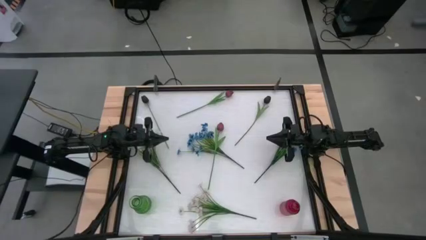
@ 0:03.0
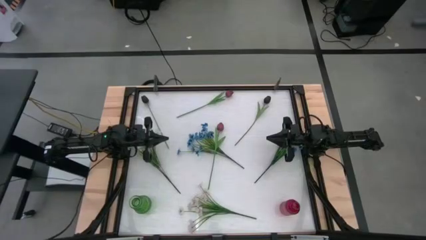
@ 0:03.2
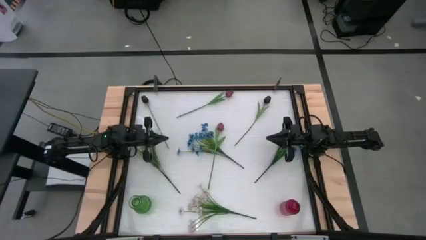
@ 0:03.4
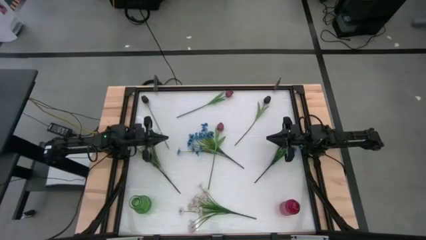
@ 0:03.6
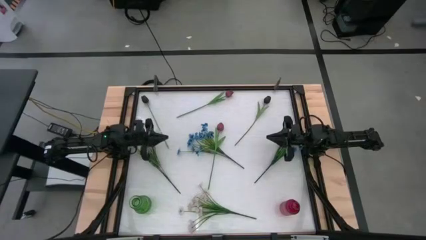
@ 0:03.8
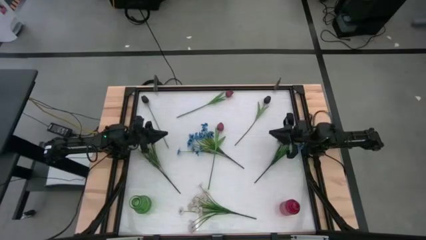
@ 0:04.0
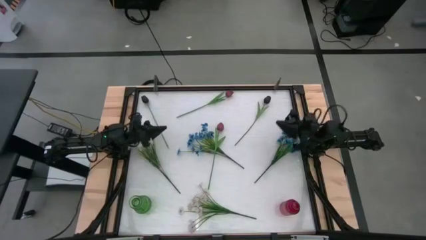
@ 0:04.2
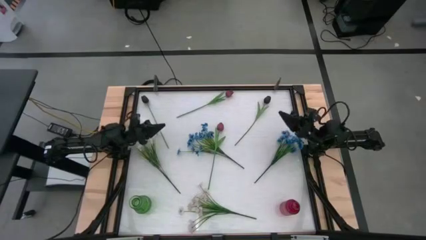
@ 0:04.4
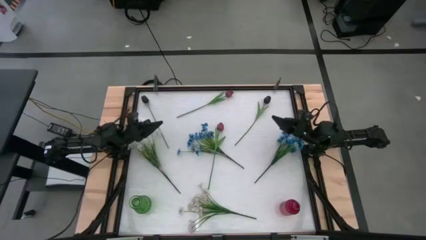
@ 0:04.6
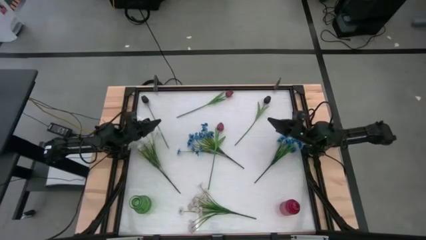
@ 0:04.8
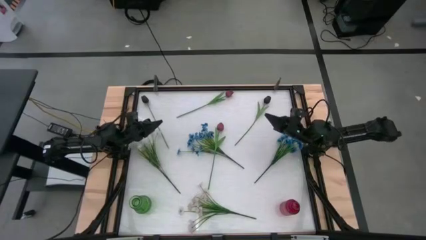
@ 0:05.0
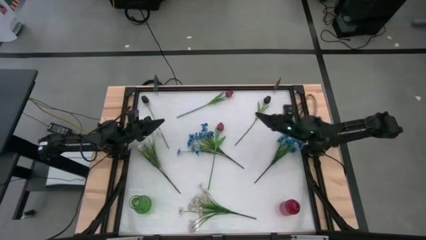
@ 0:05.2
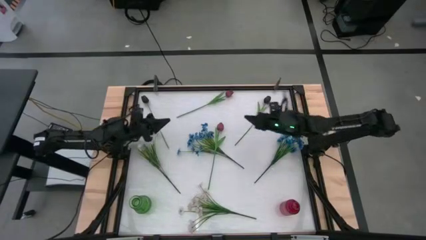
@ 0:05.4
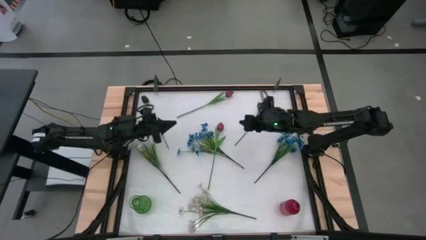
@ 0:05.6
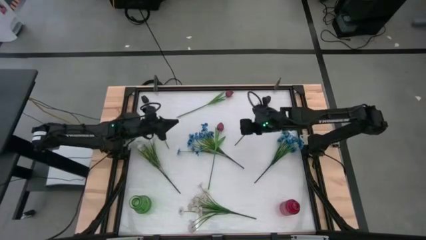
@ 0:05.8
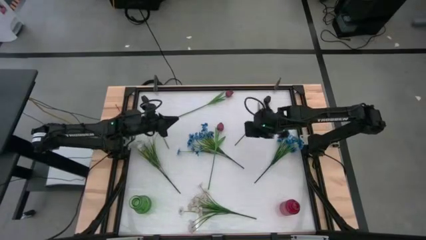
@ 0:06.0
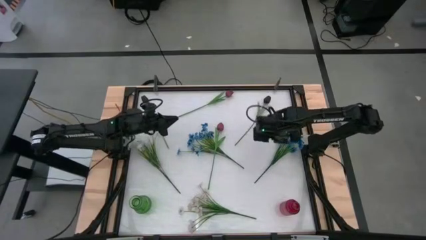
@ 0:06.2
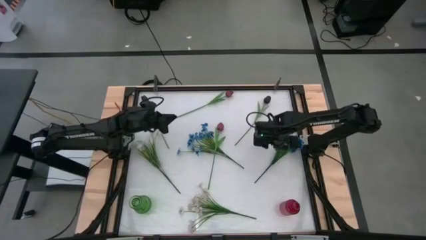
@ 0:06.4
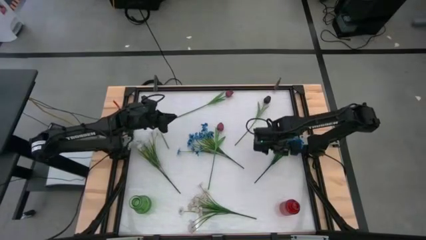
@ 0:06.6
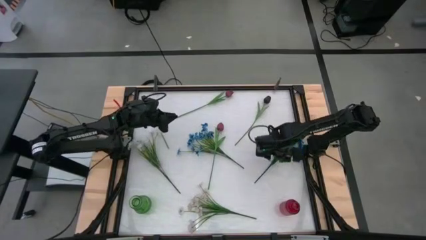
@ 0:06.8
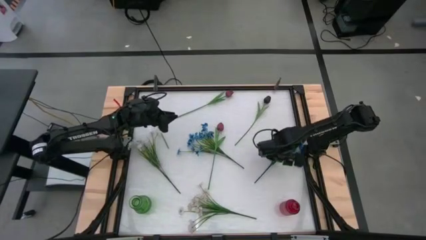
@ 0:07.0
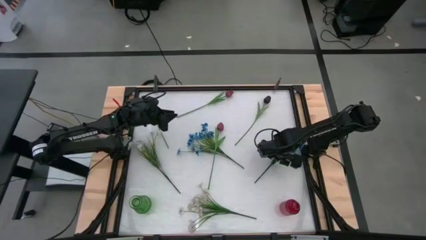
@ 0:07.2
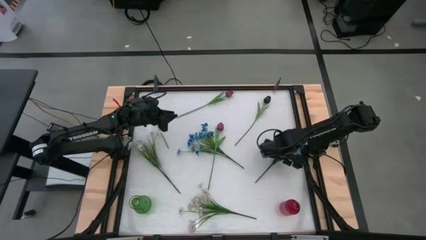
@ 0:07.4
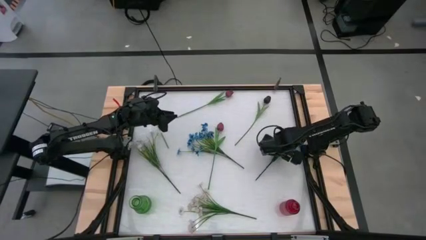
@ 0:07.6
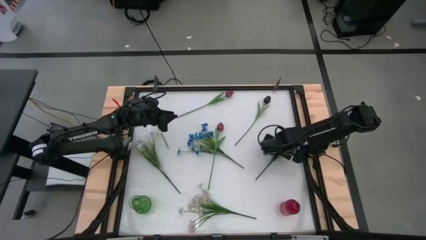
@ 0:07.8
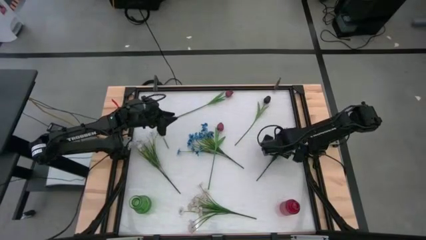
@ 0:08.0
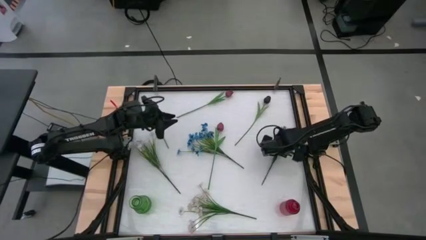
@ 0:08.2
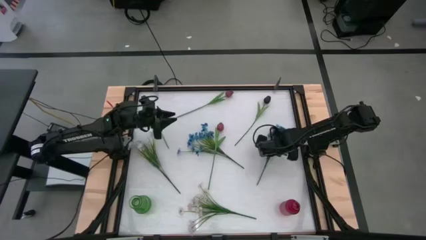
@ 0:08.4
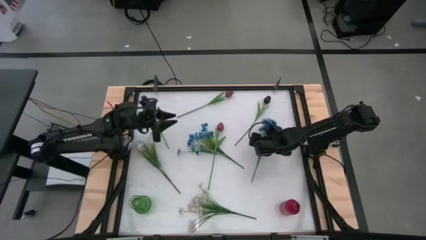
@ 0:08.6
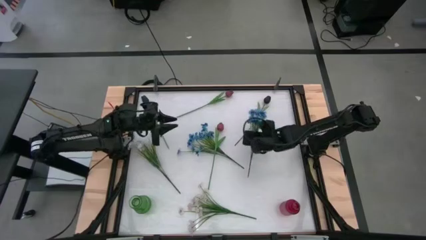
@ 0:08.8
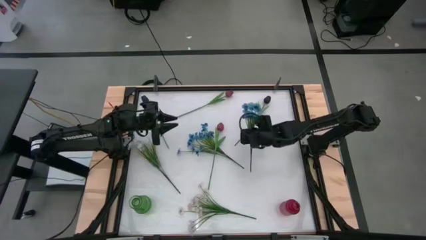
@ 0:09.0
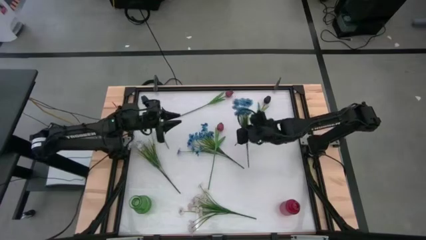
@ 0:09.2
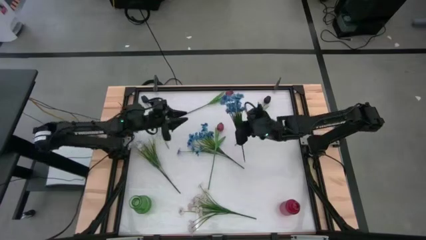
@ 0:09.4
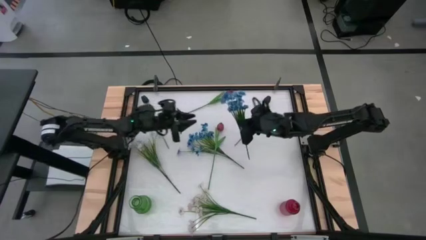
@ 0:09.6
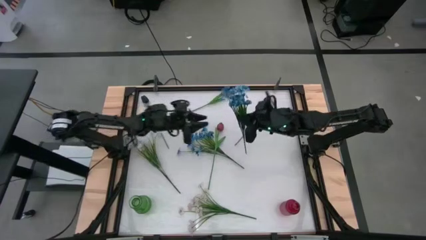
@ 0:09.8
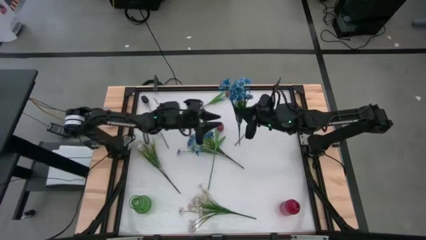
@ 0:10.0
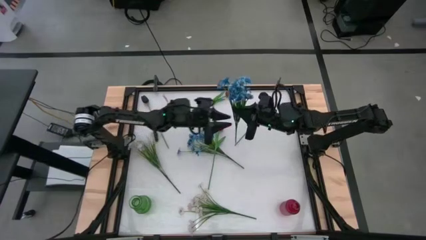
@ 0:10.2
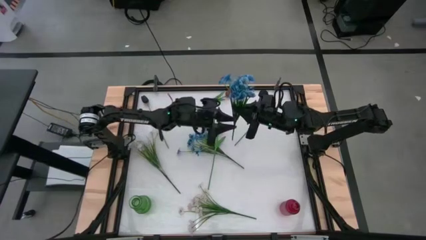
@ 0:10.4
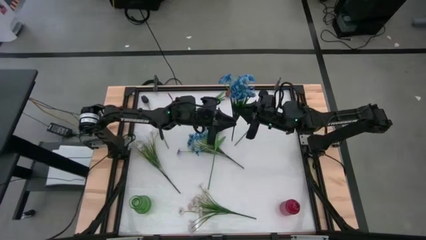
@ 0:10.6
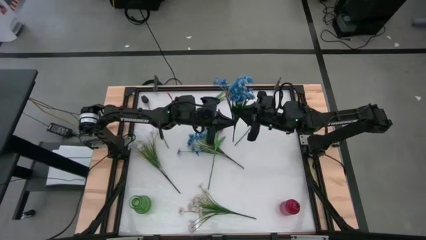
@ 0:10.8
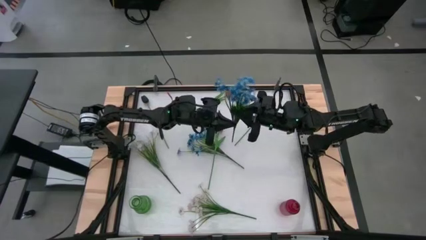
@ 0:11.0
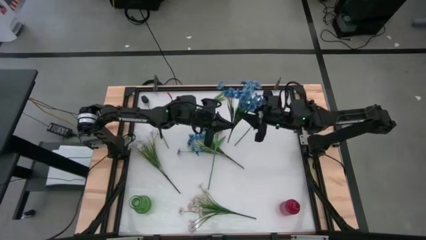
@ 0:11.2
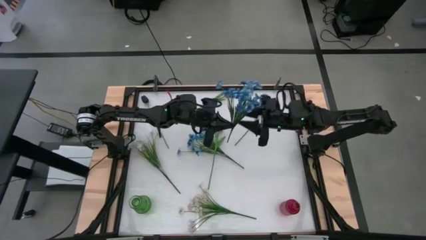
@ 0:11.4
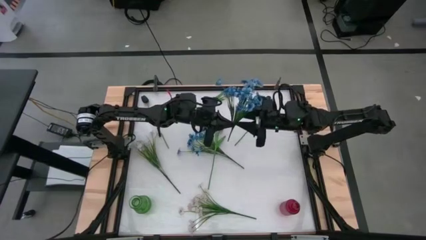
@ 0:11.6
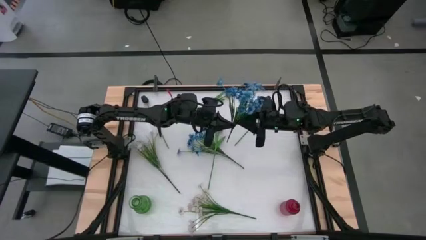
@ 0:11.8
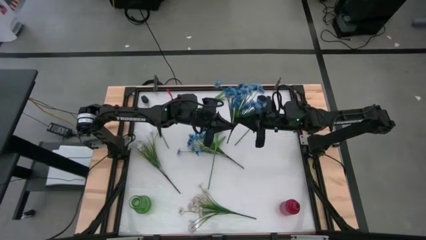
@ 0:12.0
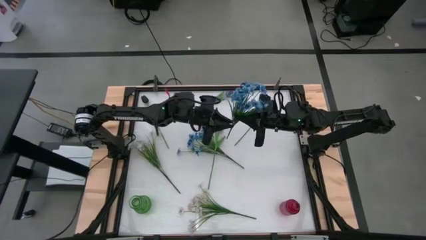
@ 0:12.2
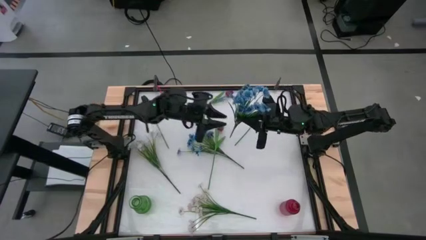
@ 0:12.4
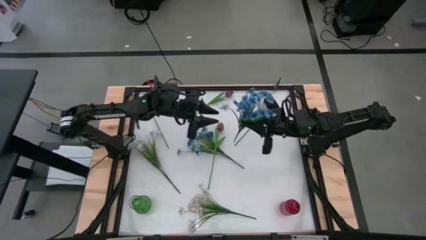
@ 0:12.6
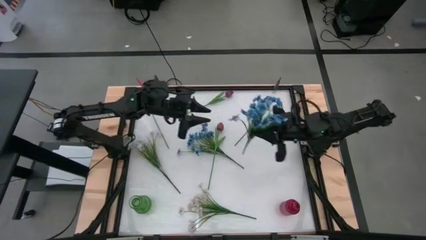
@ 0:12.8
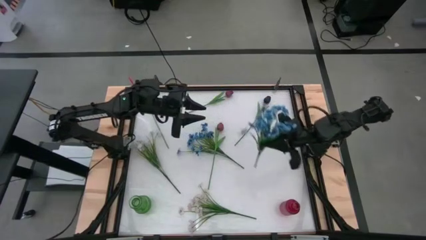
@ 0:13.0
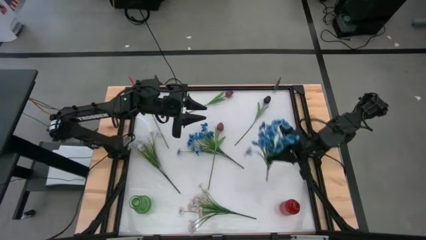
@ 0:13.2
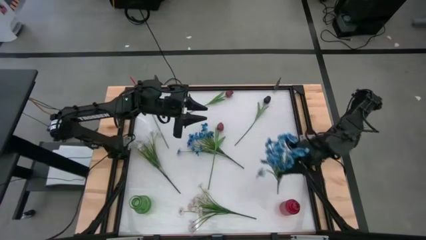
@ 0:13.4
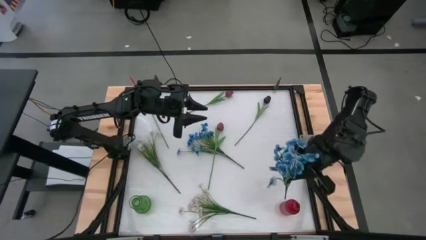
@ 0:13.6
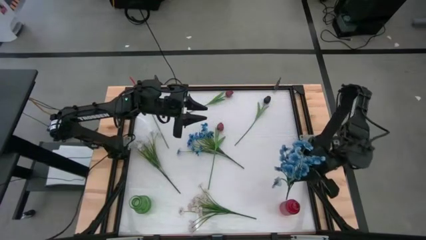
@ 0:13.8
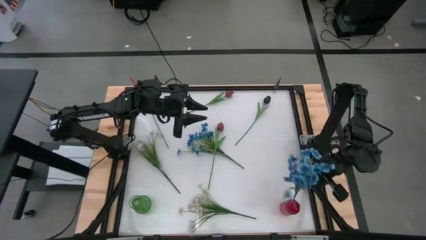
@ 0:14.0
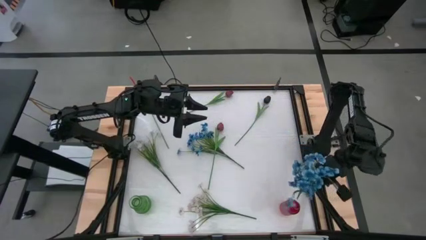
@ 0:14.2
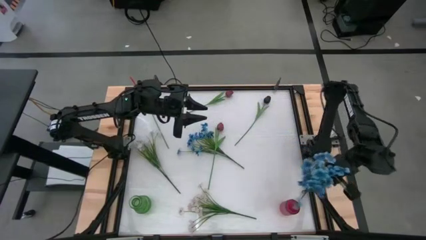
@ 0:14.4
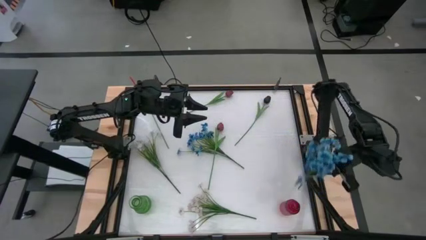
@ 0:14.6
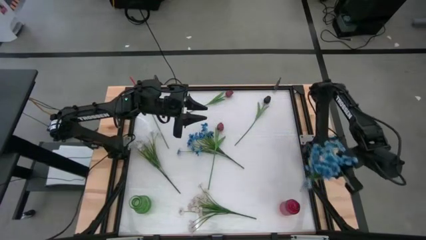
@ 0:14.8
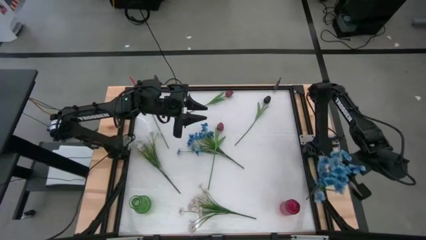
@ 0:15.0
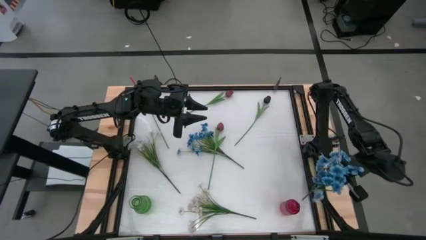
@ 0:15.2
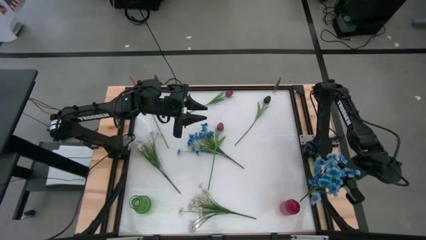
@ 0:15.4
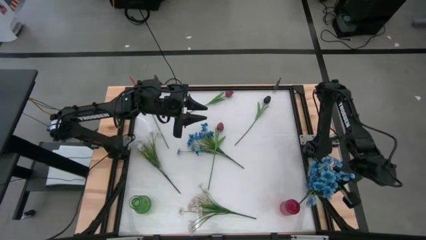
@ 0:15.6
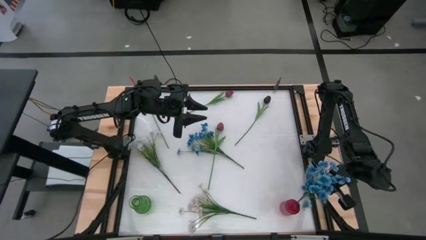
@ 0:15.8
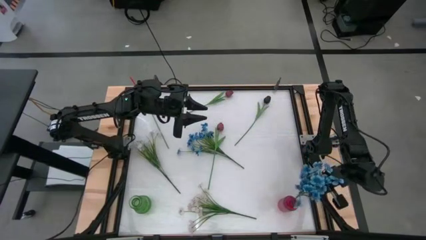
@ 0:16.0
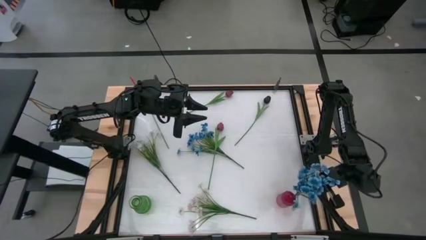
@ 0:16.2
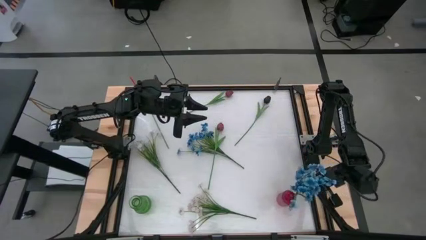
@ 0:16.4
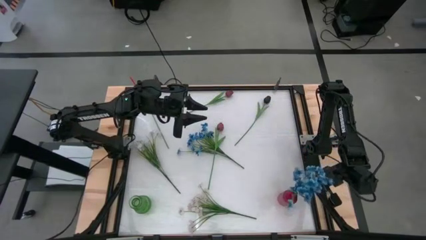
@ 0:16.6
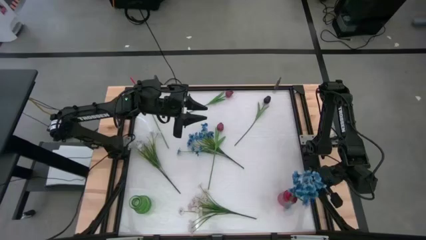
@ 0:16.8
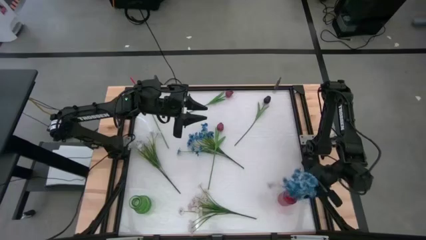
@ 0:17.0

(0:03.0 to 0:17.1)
Task: Sort flowers into vase by color
Put the right blue flowers into the red flower vase
